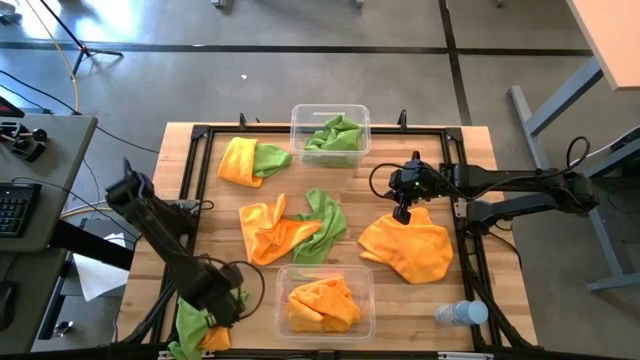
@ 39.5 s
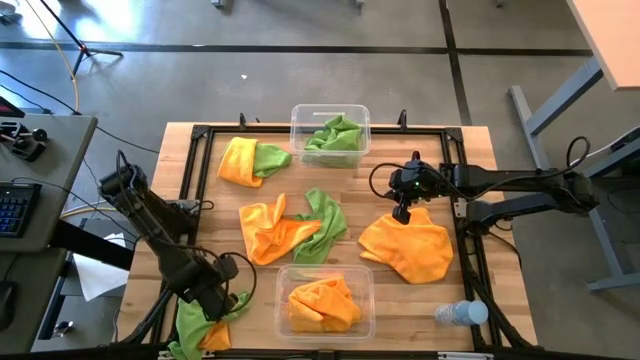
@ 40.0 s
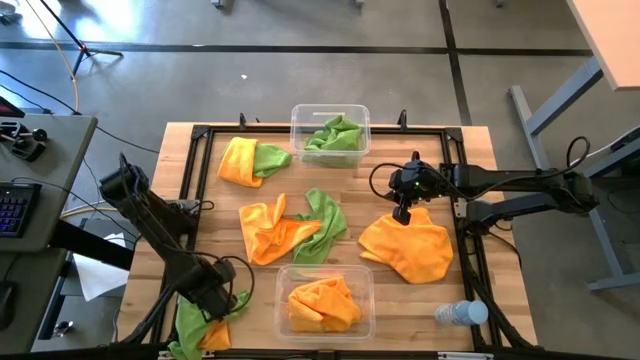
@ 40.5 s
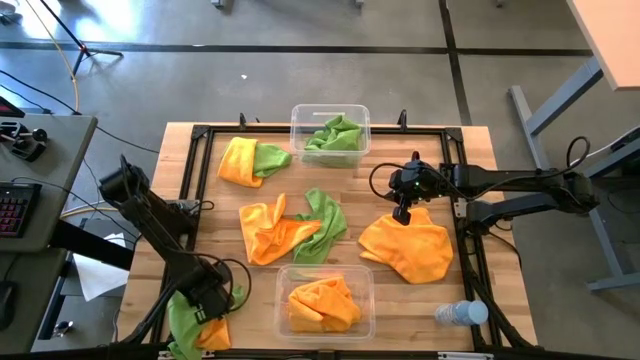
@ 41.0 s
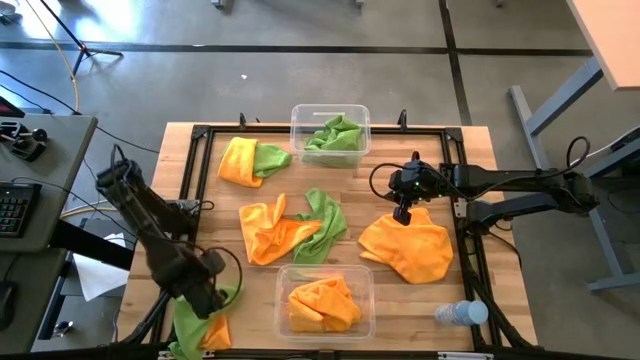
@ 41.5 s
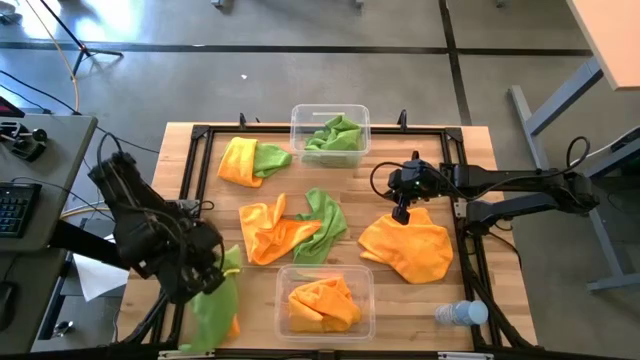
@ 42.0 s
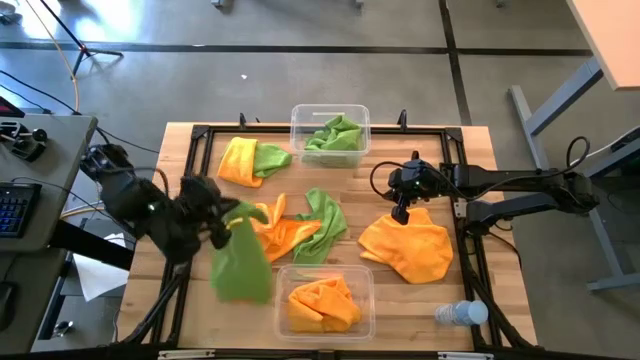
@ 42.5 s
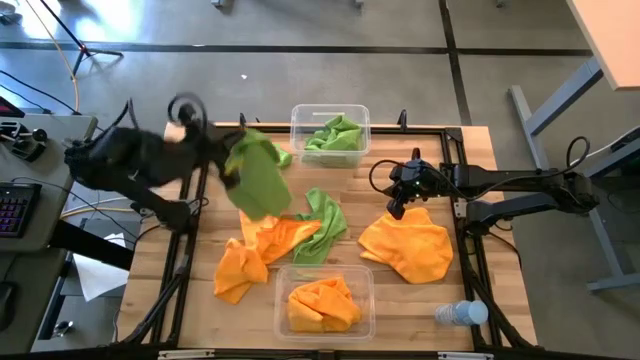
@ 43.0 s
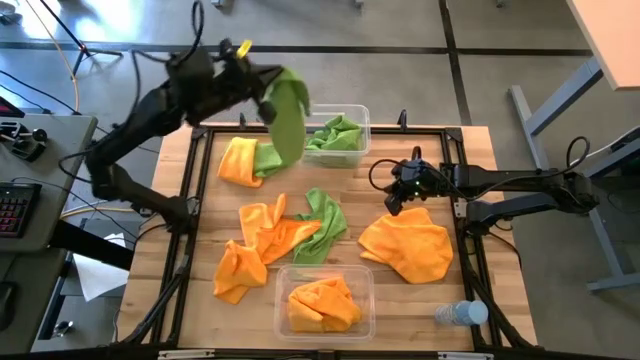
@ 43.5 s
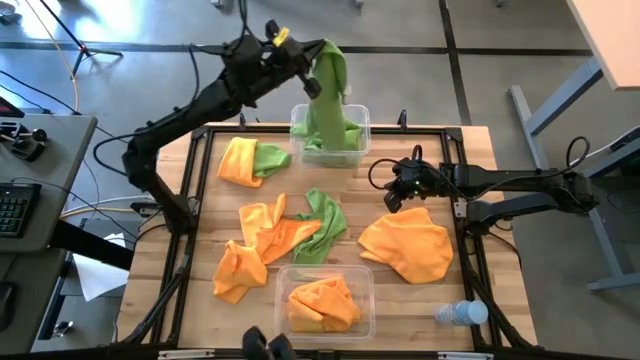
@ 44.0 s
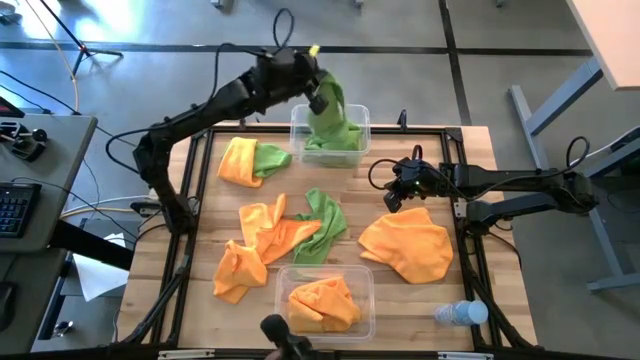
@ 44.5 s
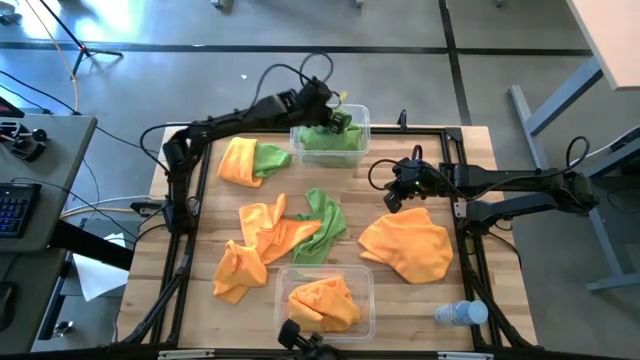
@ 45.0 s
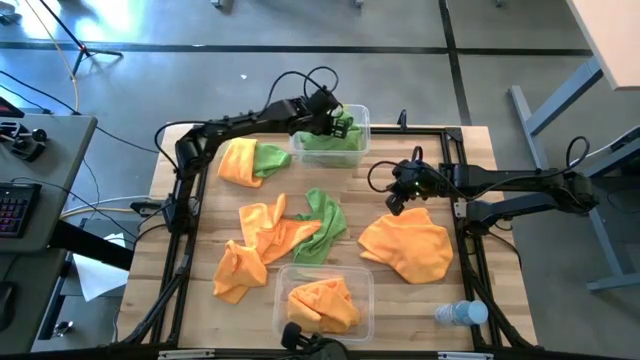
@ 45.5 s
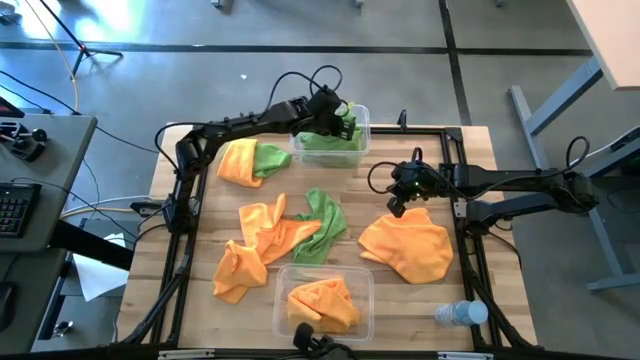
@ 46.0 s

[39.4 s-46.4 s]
Task: Sort microfiber towel by color & place in baskets
Put the green towel into the top transparent bin

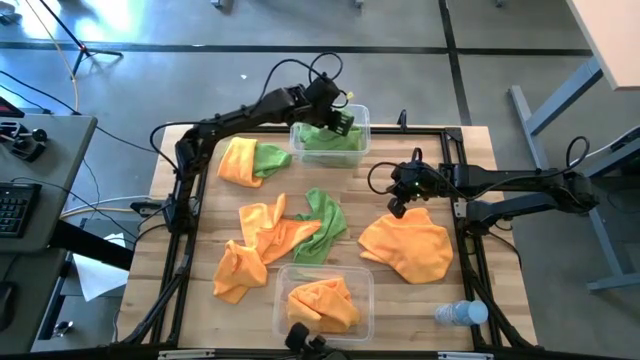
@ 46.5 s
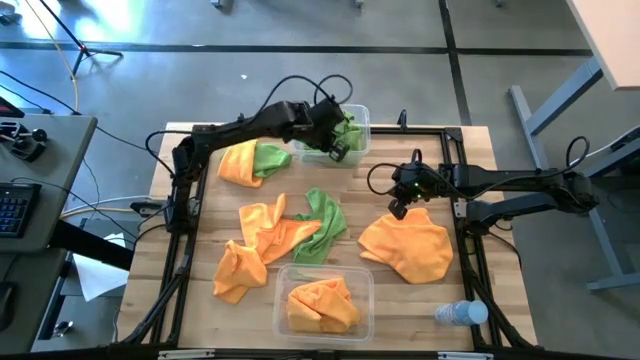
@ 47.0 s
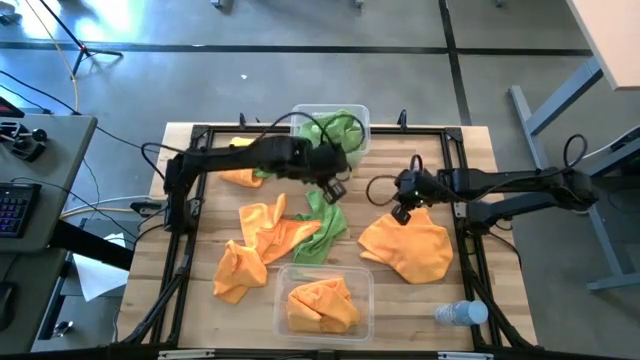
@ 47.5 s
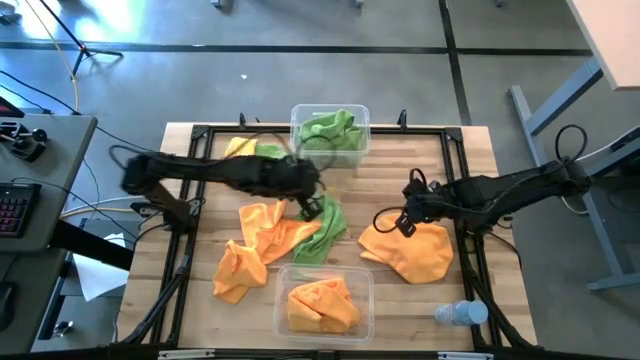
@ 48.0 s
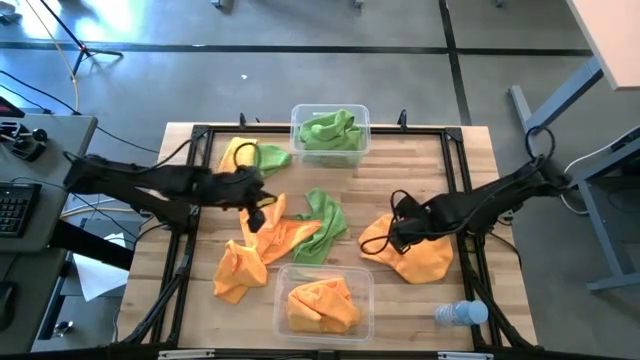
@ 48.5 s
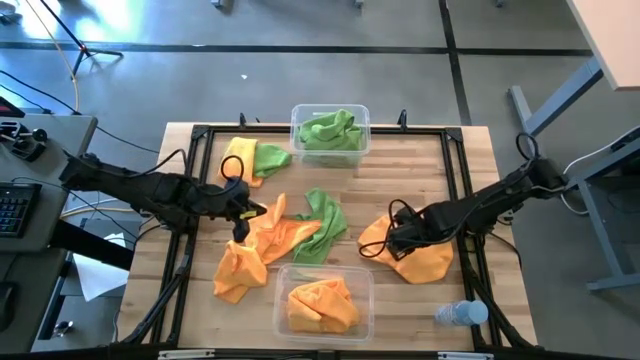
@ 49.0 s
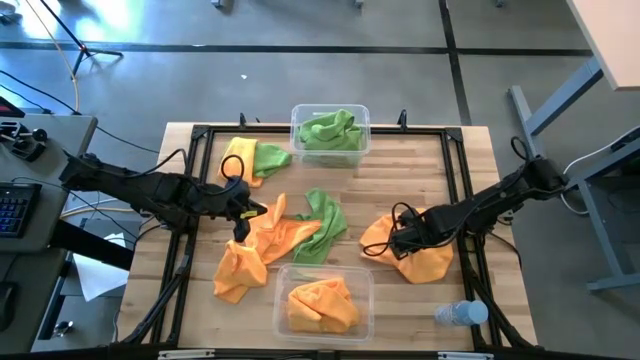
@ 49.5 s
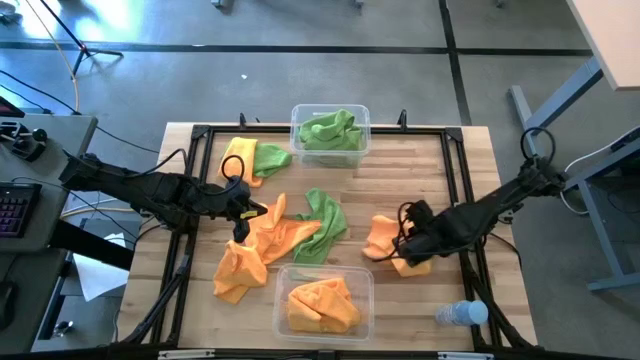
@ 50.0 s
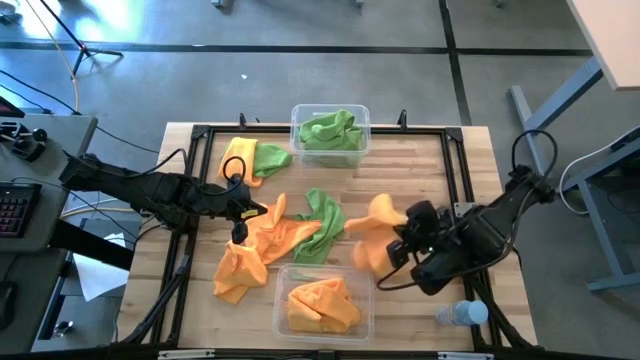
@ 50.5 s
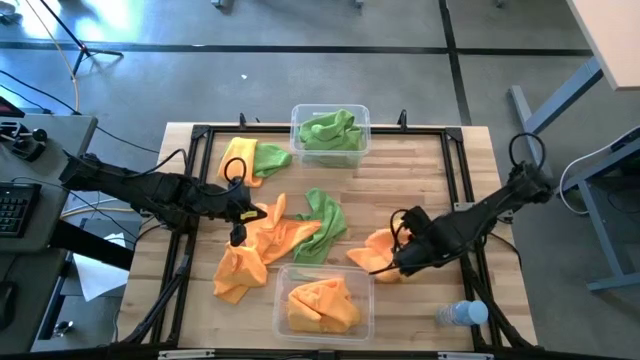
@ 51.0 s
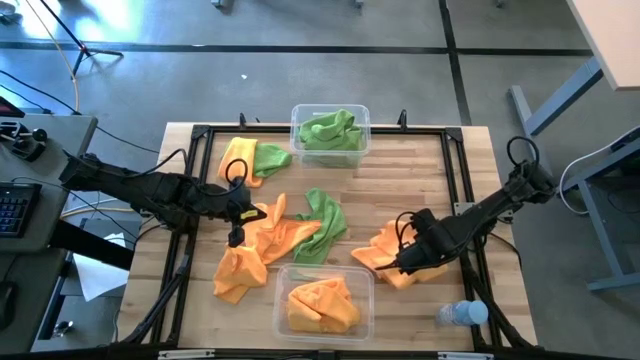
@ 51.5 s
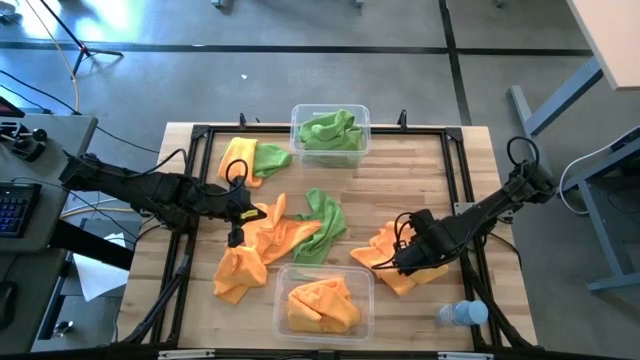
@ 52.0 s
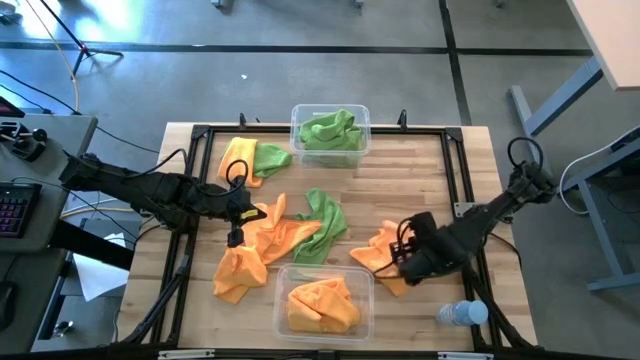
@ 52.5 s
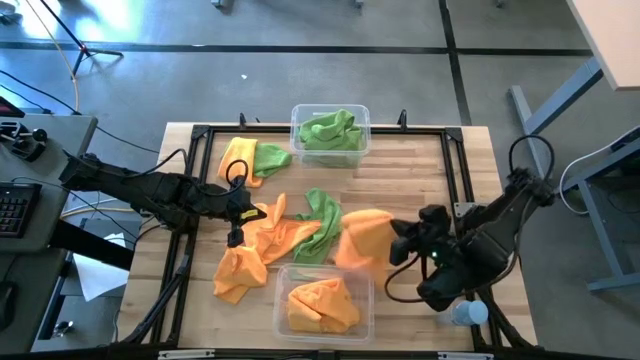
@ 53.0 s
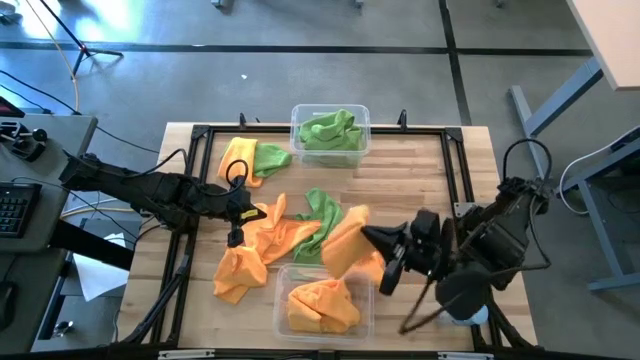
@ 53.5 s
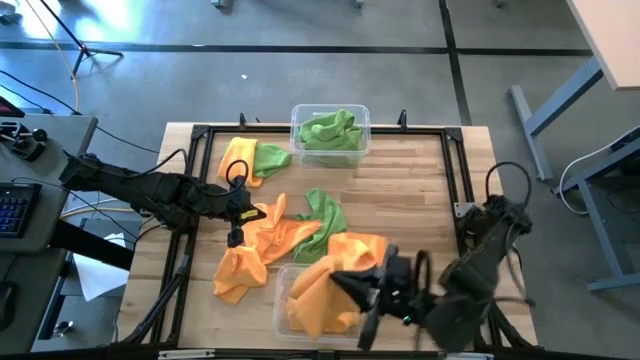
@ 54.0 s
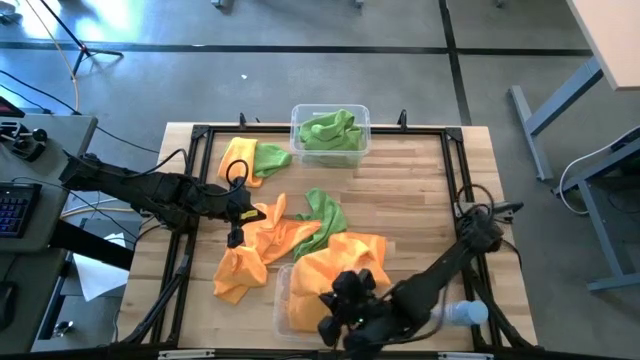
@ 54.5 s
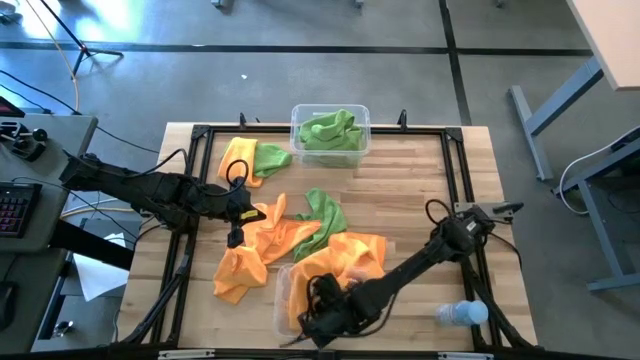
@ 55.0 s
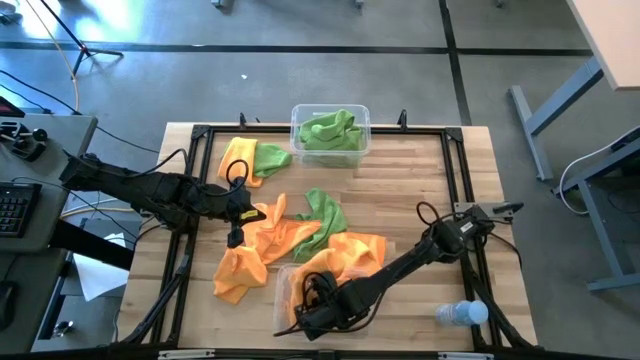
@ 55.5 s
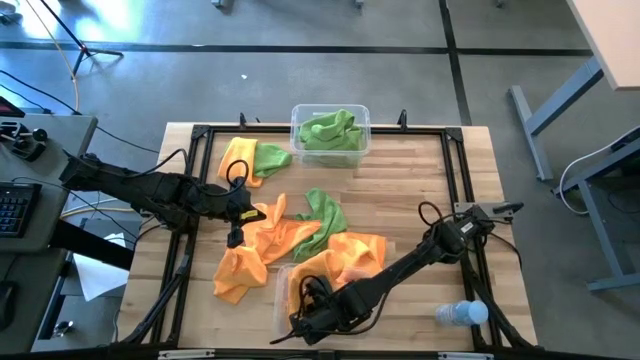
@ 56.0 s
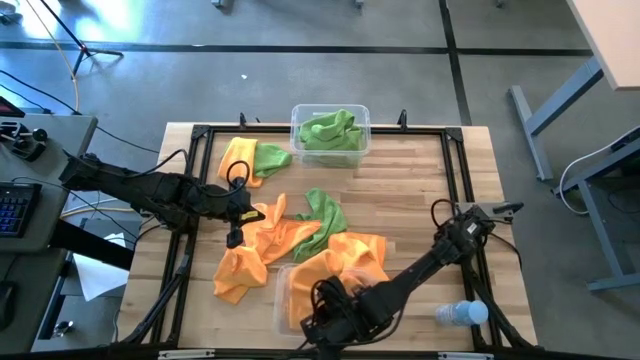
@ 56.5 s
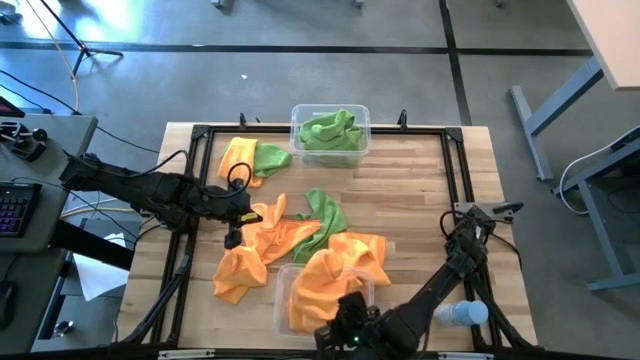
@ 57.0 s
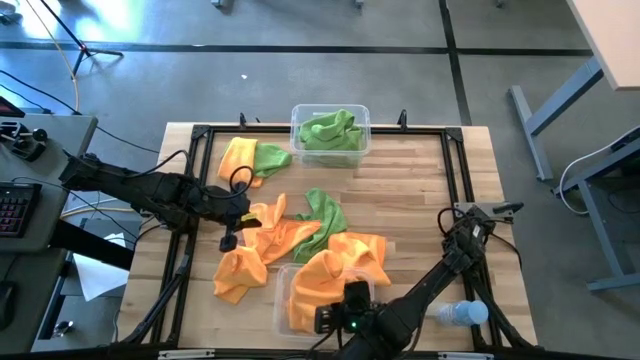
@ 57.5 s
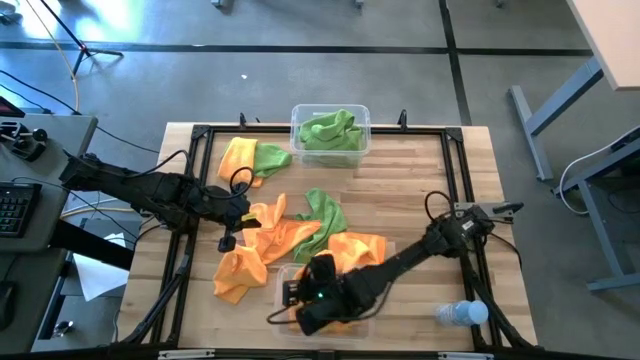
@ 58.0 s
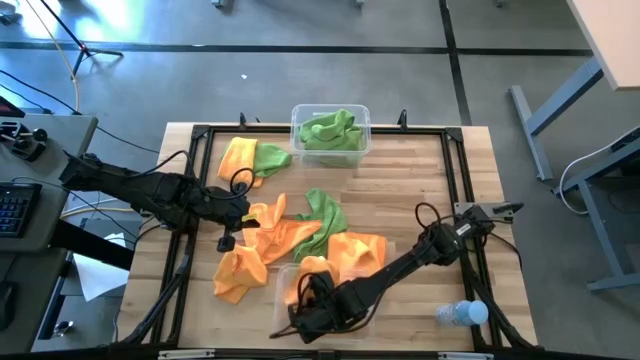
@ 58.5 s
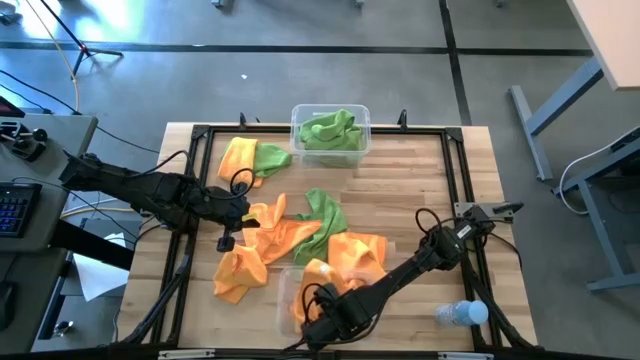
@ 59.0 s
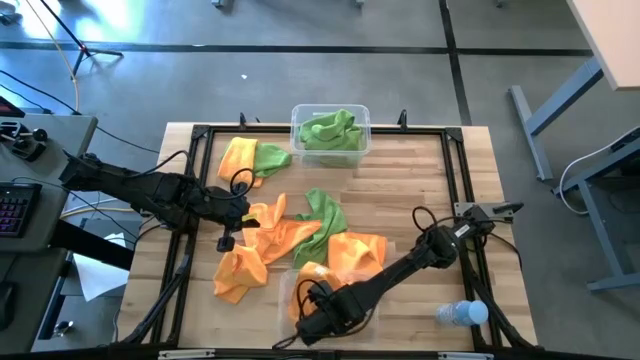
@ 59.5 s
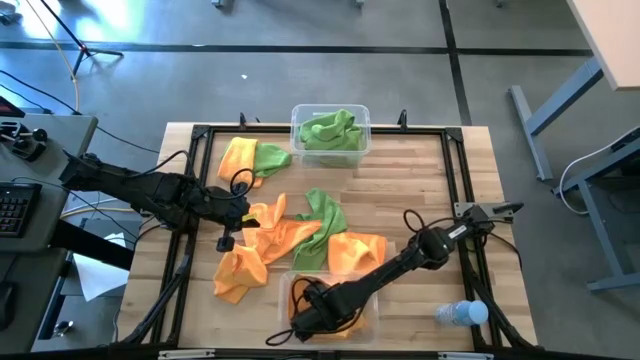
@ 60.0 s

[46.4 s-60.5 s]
Put the yellow towel into the bottom transparent bin
